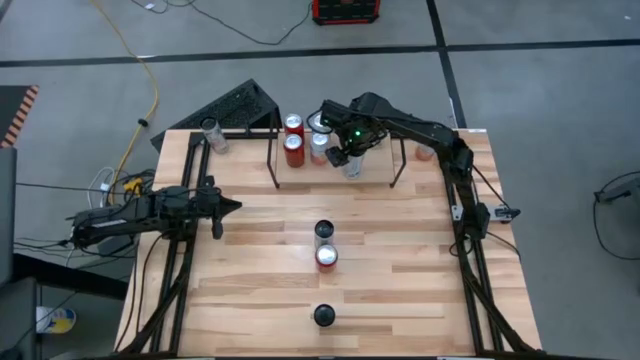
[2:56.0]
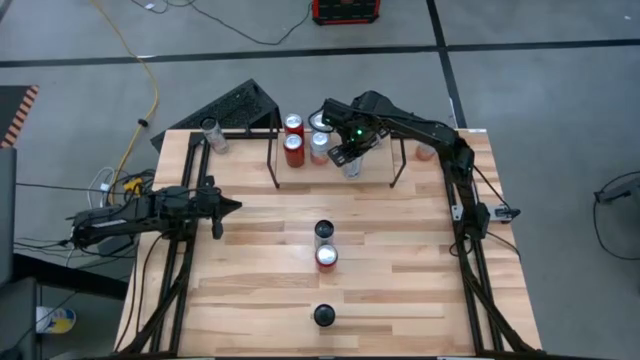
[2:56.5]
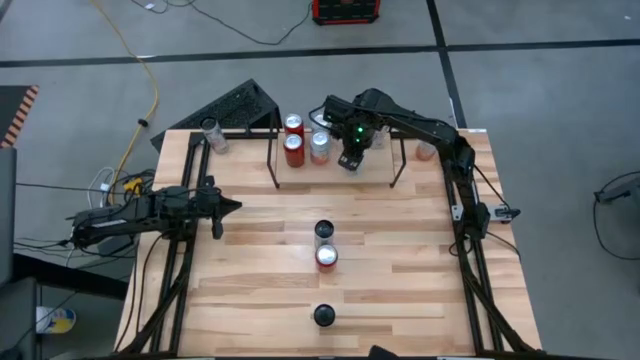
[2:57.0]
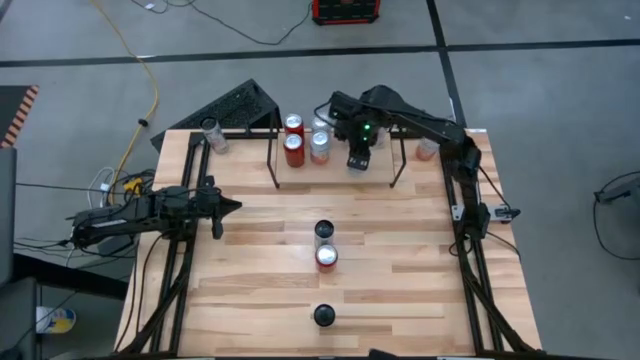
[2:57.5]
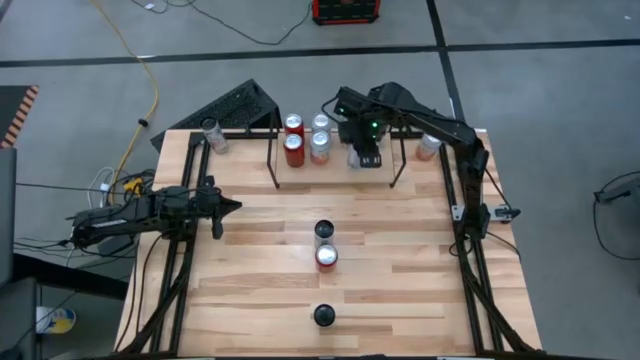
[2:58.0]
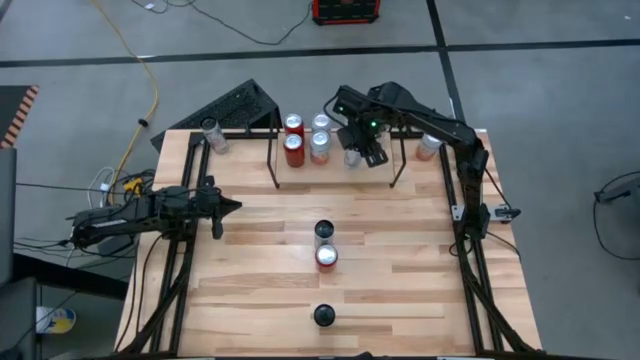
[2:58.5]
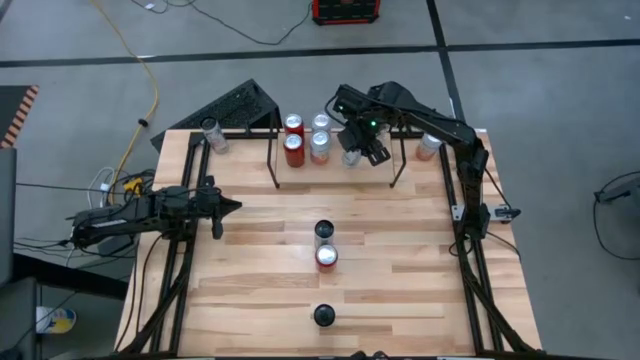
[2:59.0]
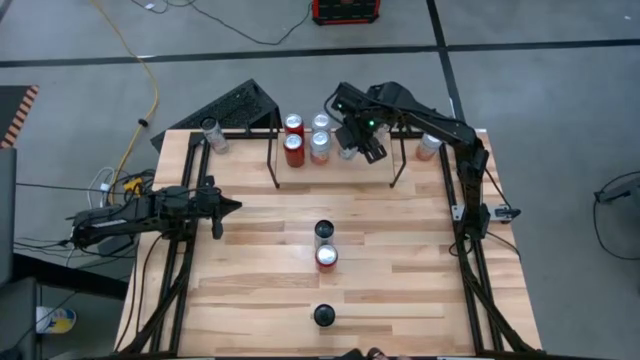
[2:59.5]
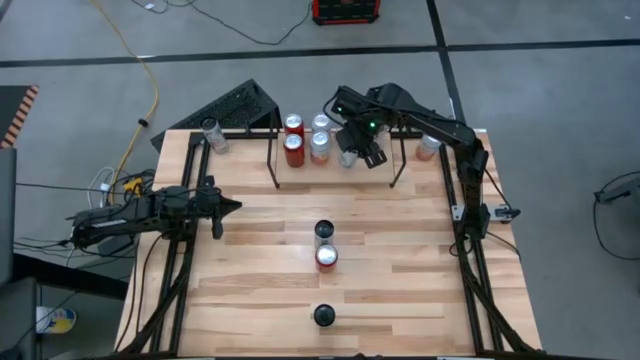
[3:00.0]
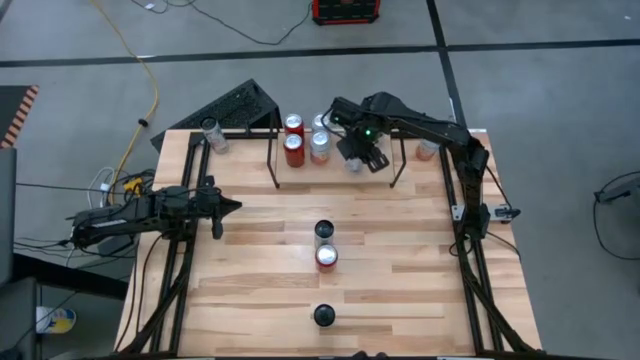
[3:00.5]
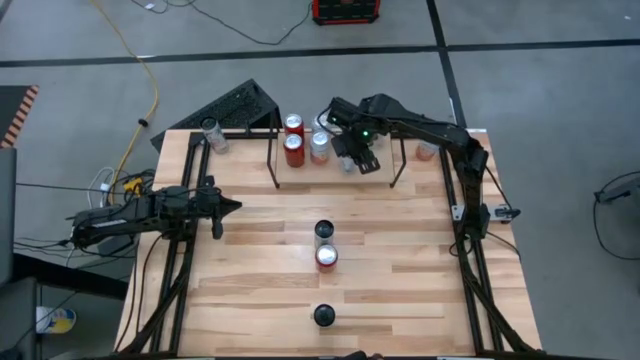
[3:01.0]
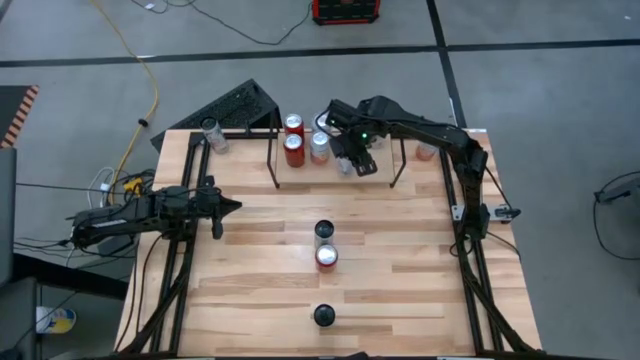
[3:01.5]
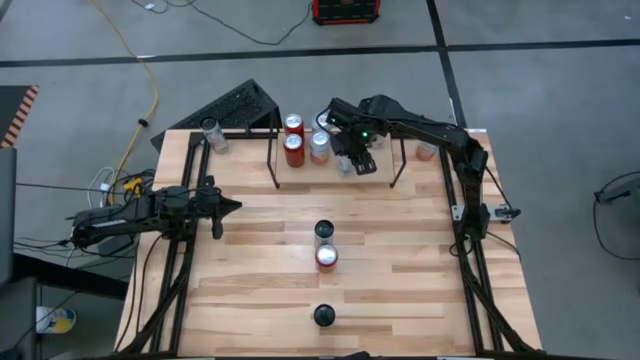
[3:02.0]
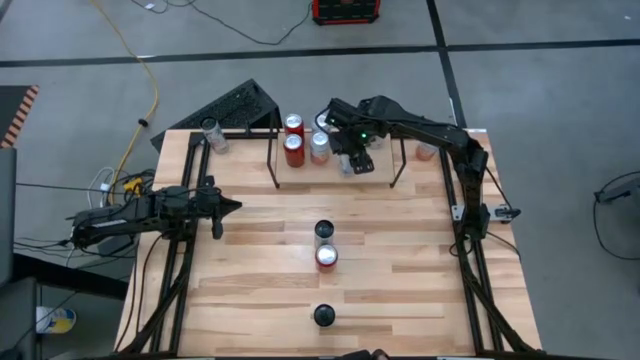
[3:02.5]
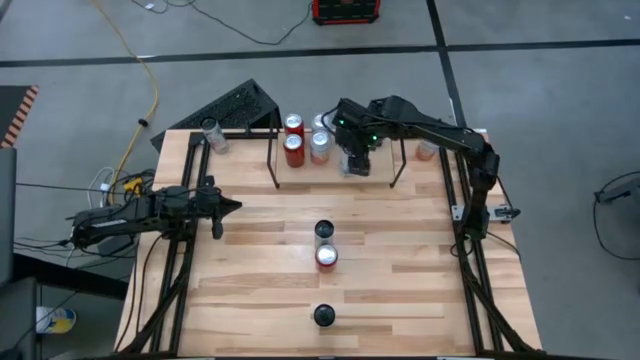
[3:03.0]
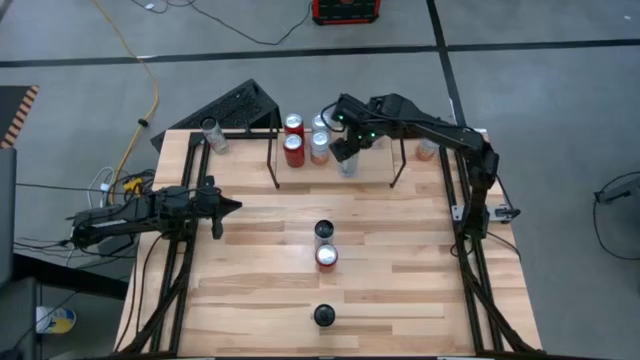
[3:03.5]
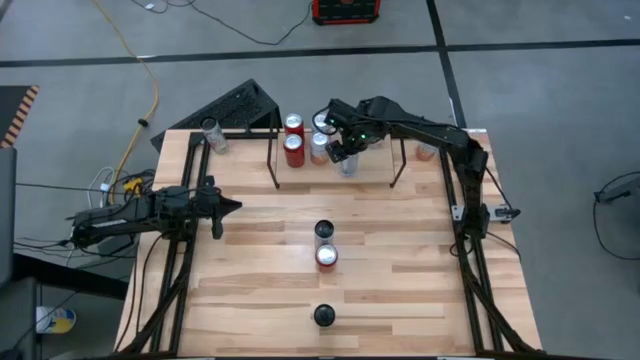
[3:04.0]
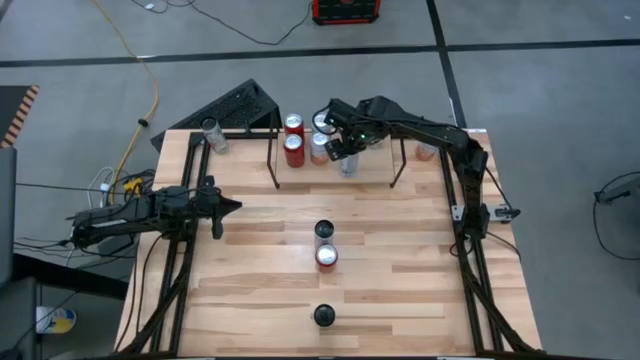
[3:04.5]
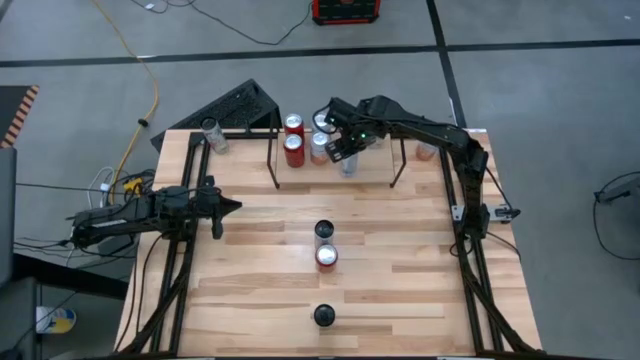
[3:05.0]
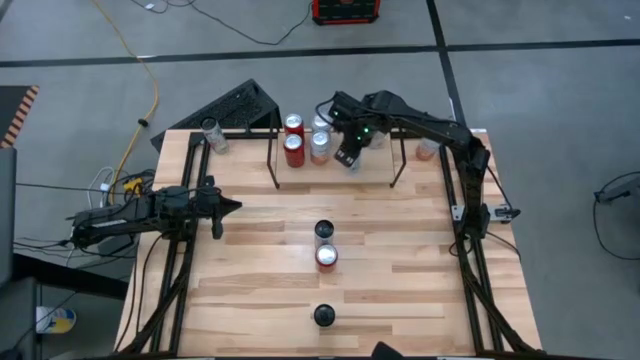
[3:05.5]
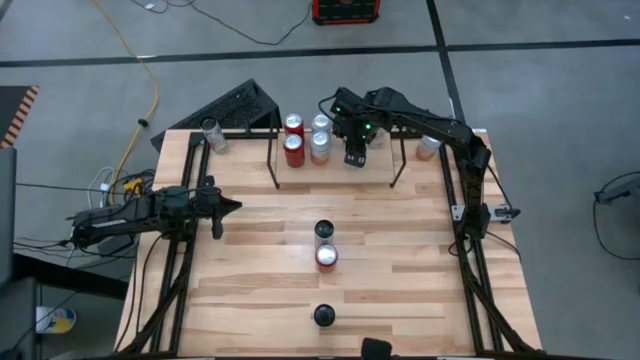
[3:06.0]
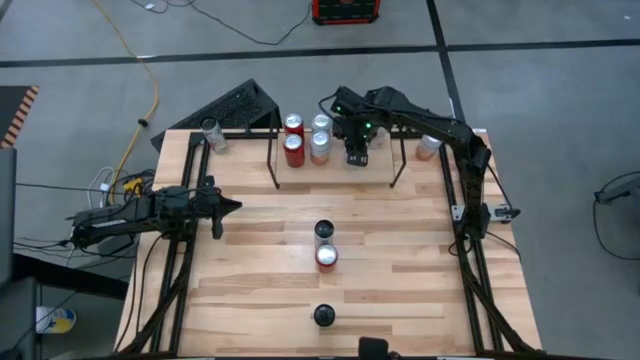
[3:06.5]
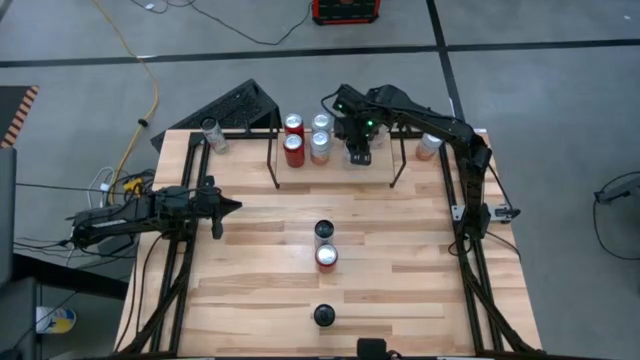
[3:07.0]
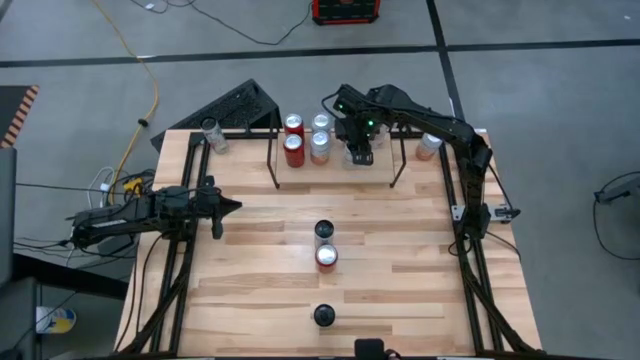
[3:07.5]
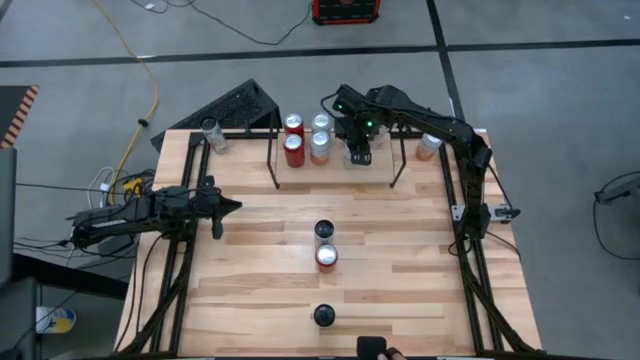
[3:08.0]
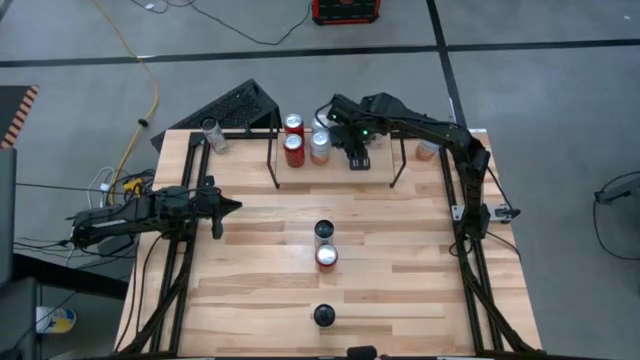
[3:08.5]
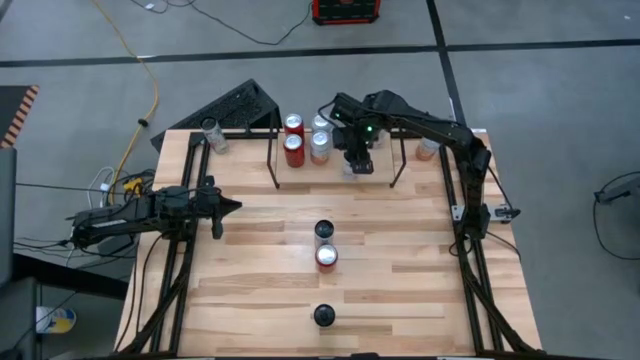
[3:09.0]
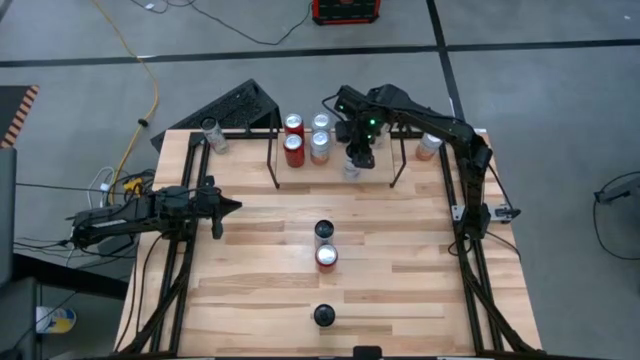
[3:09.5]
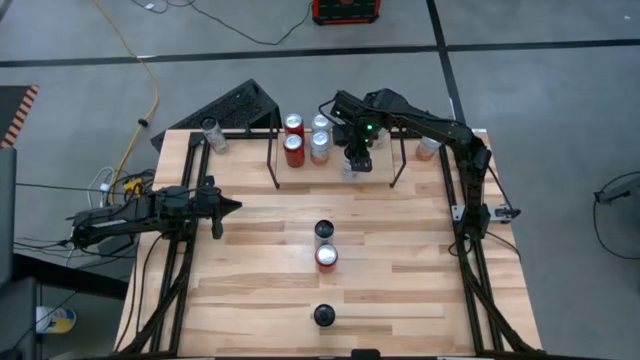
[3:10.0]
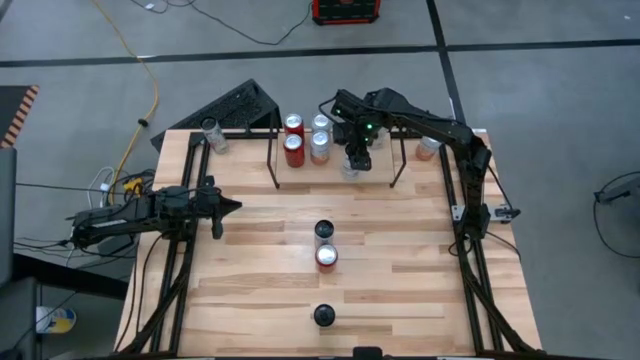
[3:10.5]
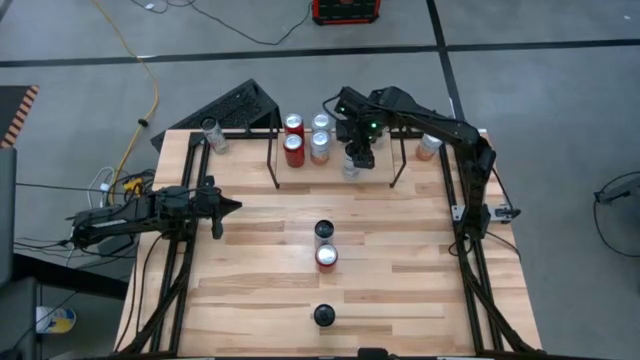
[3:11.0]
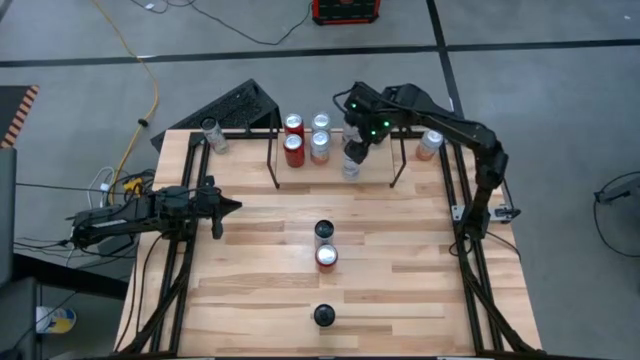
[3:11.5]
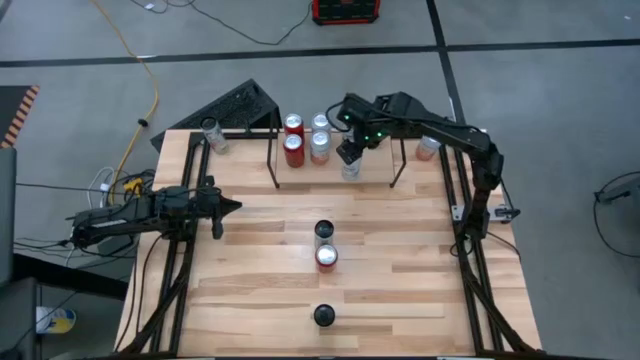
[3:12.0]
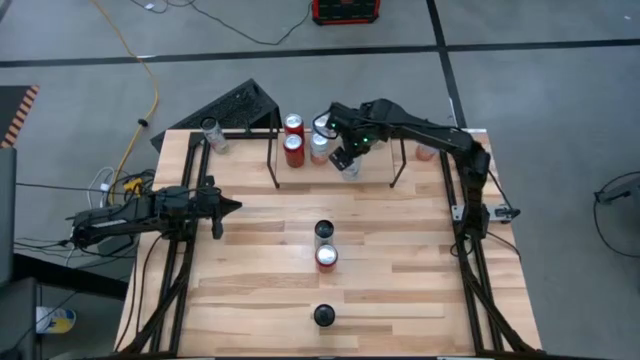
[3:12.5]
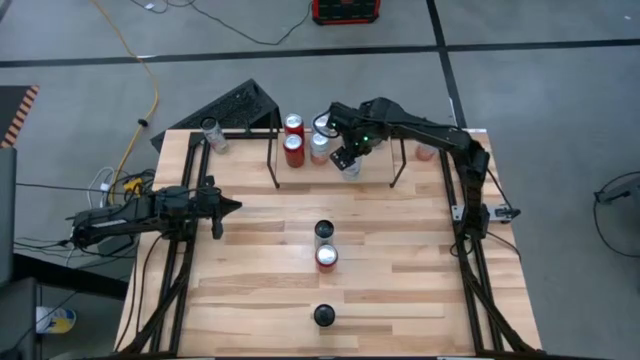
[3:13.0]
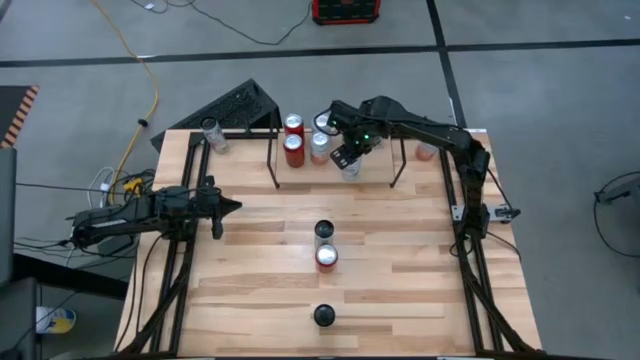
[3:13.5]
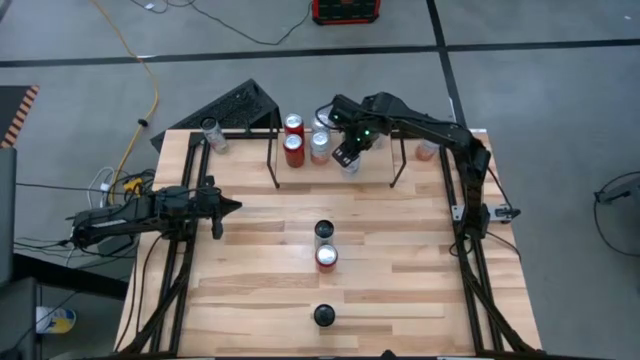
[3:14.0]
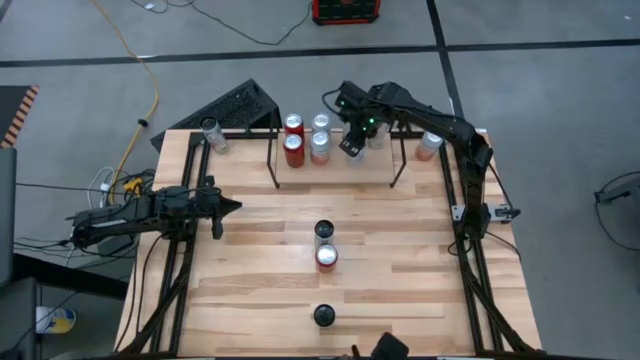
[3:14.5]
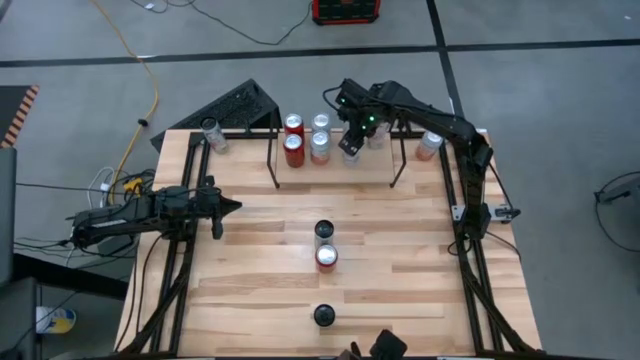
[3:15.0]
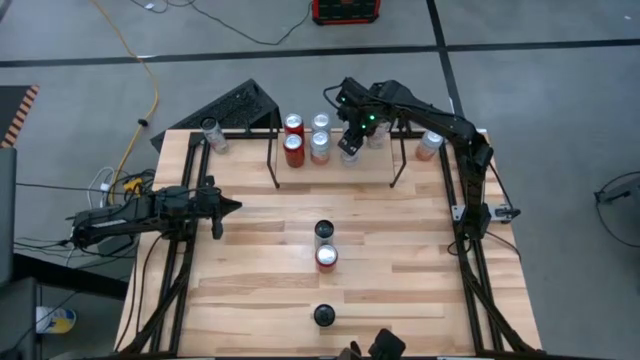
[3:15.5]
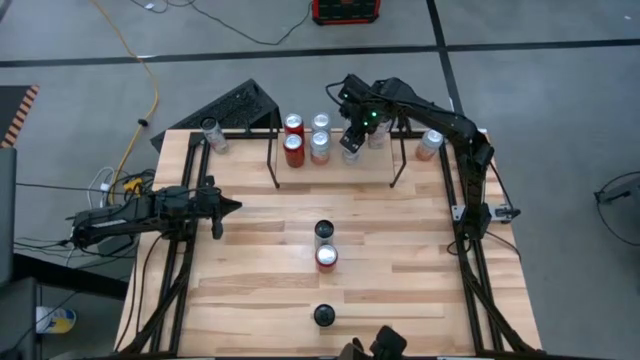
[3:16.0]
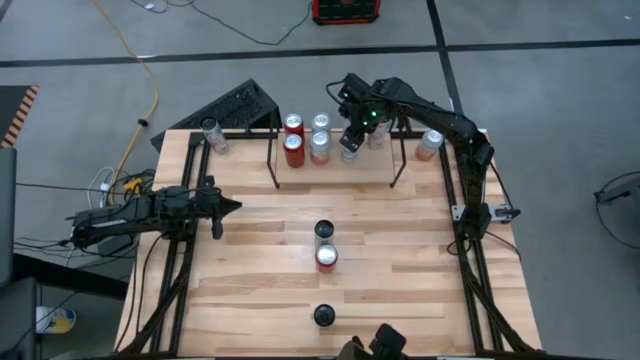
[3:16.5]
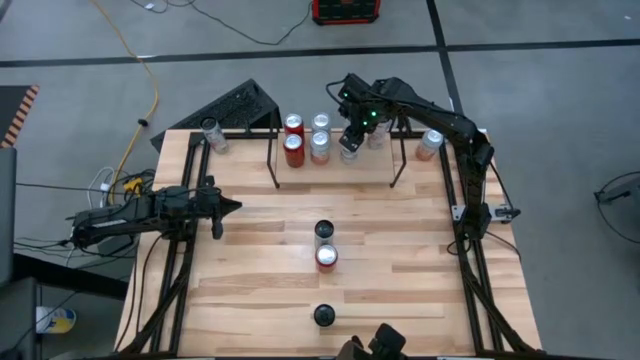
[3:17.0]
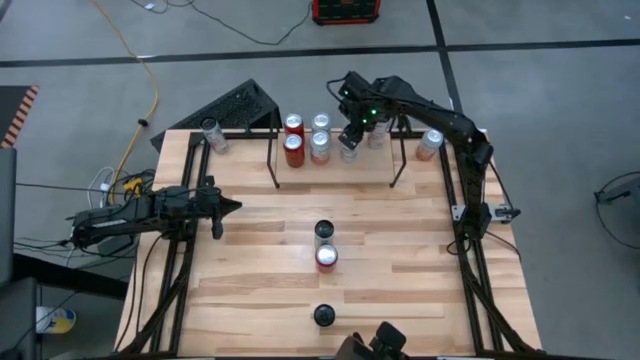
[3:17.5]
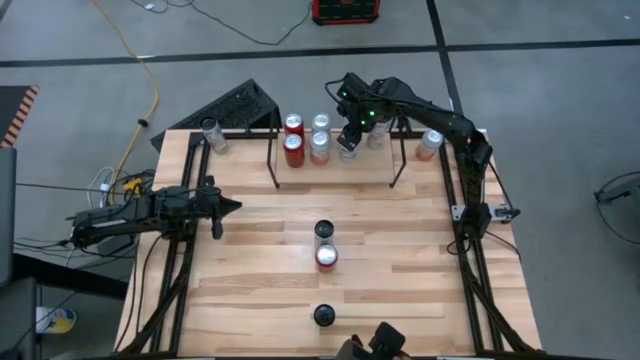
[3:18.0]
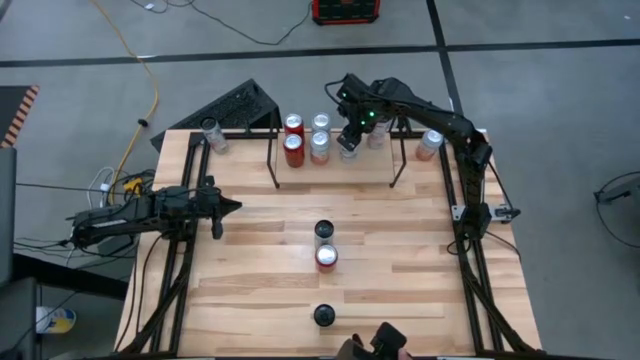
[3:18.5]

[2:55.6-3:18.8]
Task: Place canned beverage on shelf
Put the right white blue soda can on the shelf aligned with the other white blue soda can
